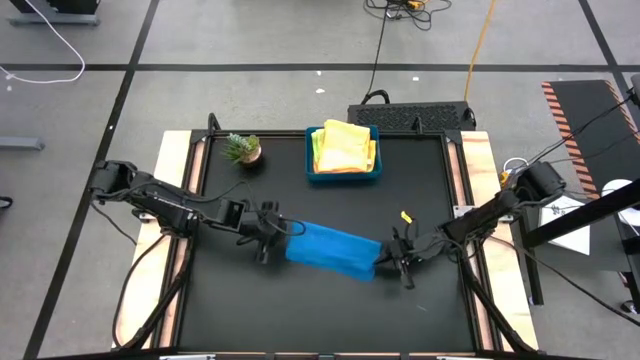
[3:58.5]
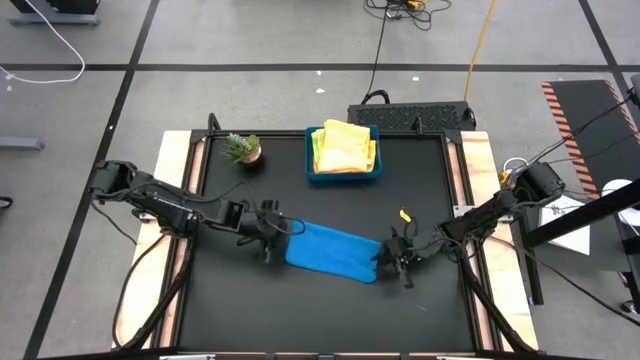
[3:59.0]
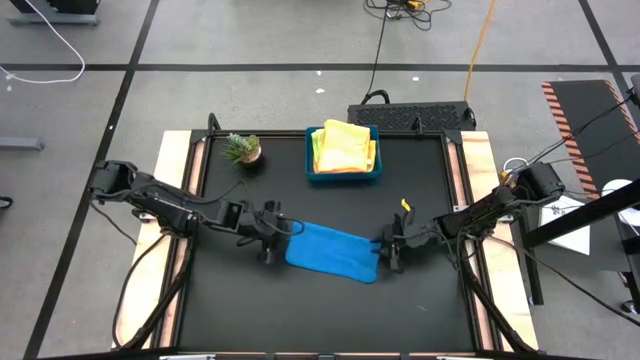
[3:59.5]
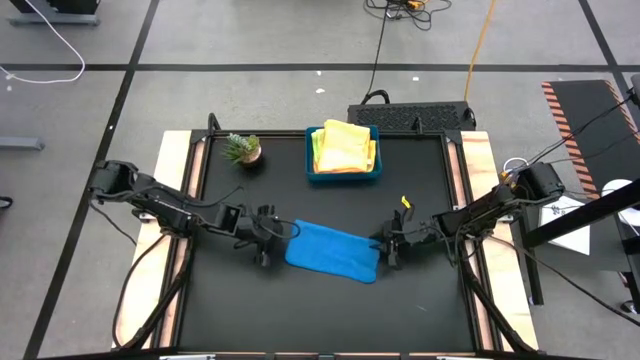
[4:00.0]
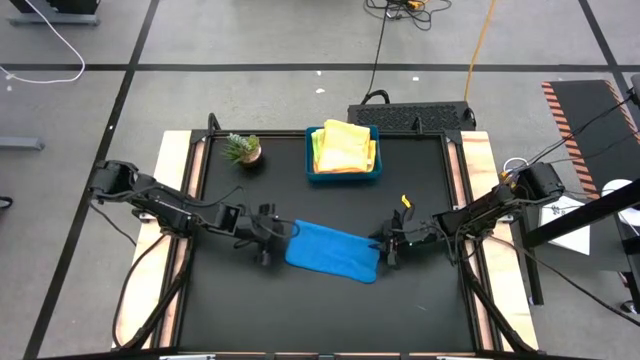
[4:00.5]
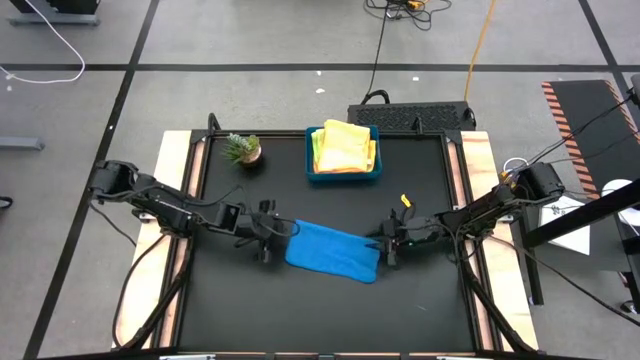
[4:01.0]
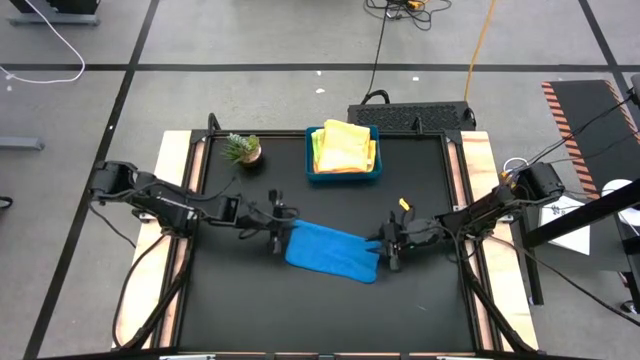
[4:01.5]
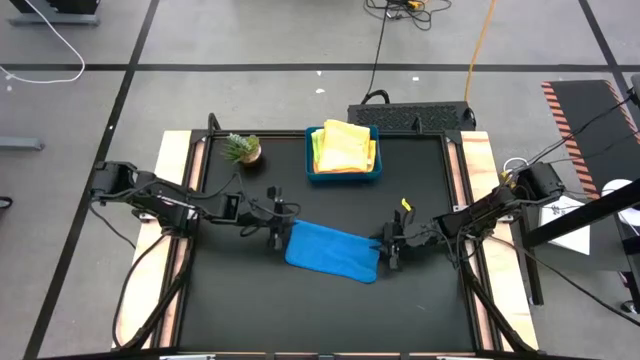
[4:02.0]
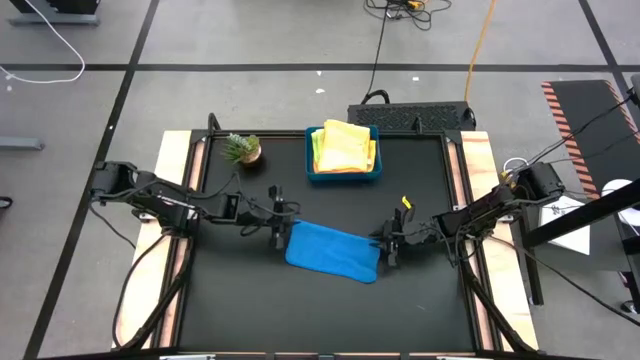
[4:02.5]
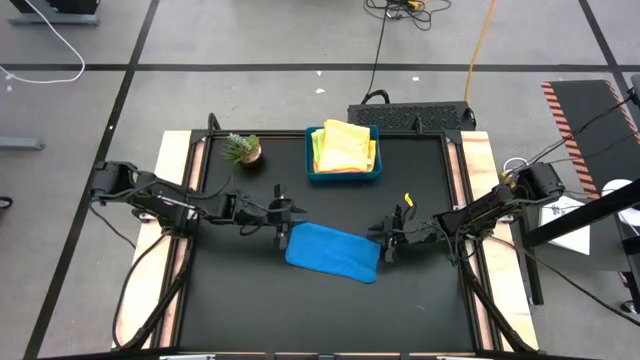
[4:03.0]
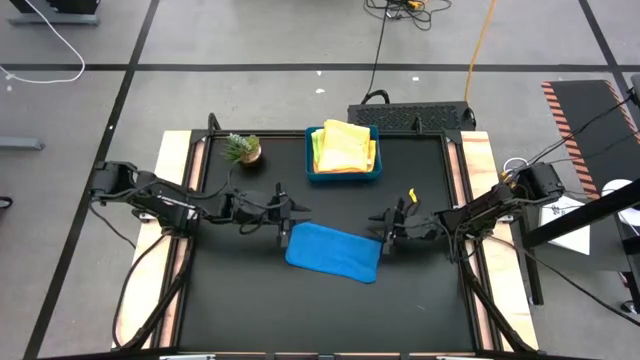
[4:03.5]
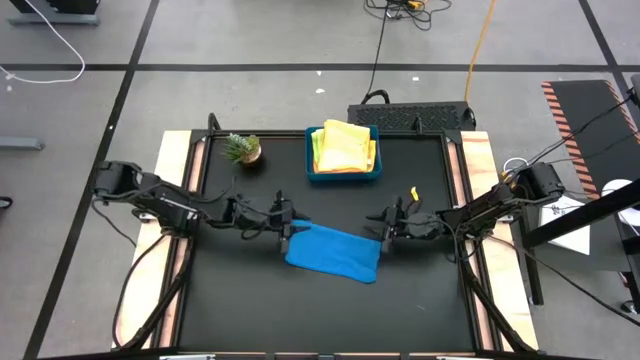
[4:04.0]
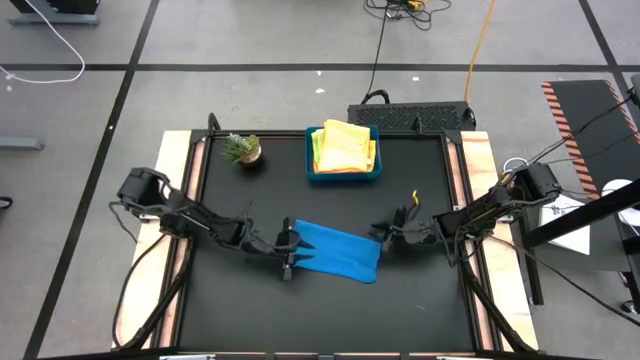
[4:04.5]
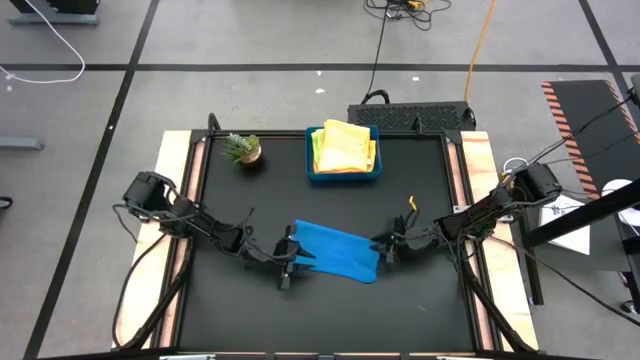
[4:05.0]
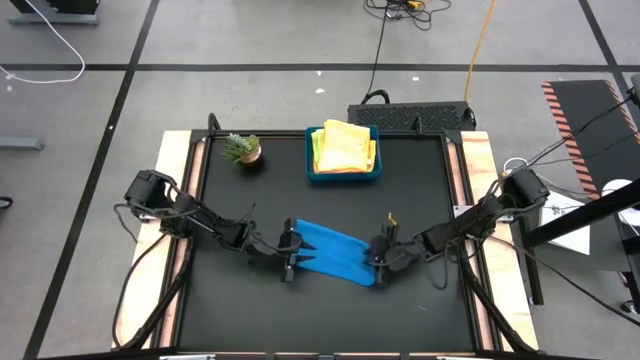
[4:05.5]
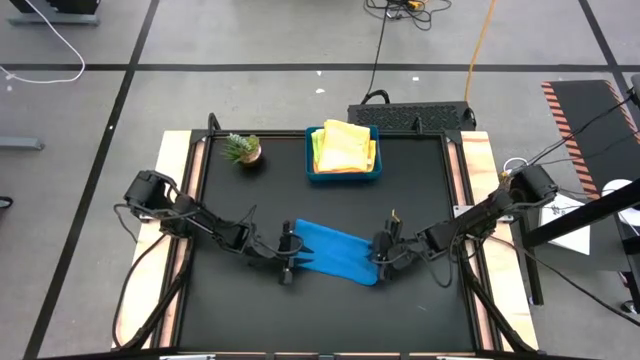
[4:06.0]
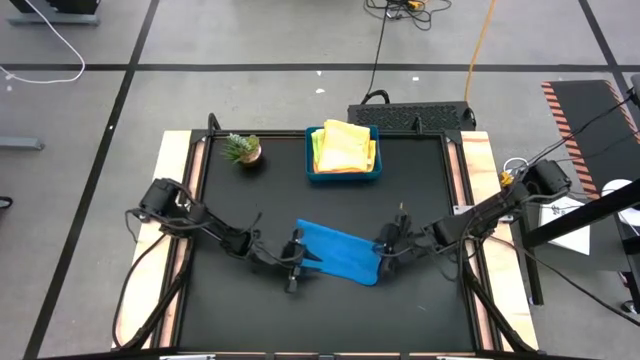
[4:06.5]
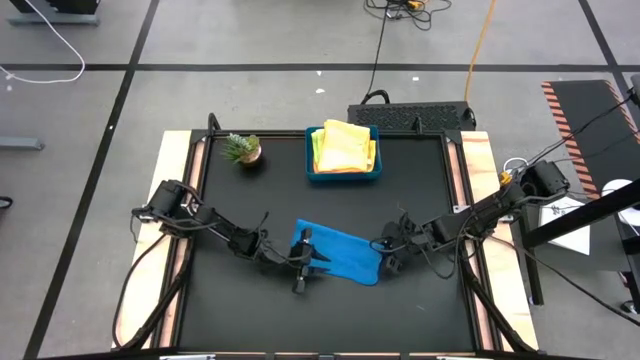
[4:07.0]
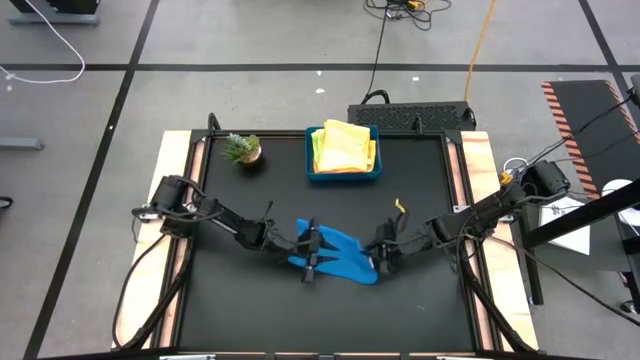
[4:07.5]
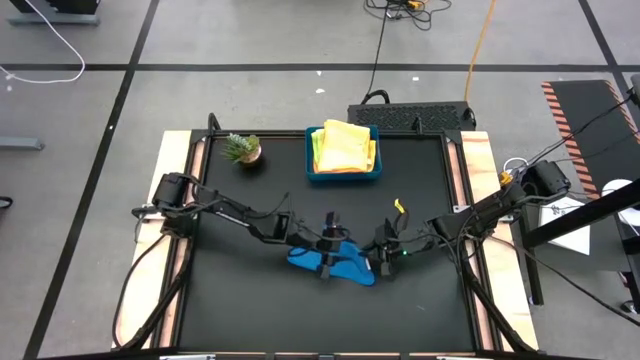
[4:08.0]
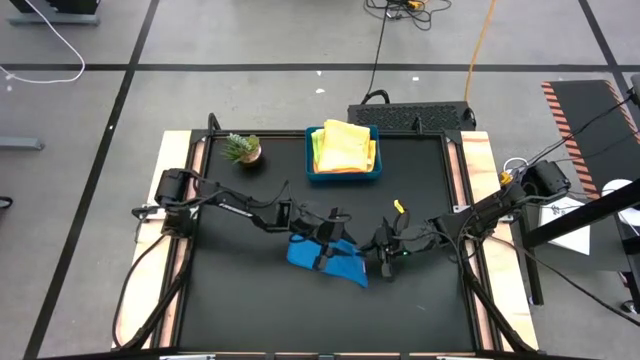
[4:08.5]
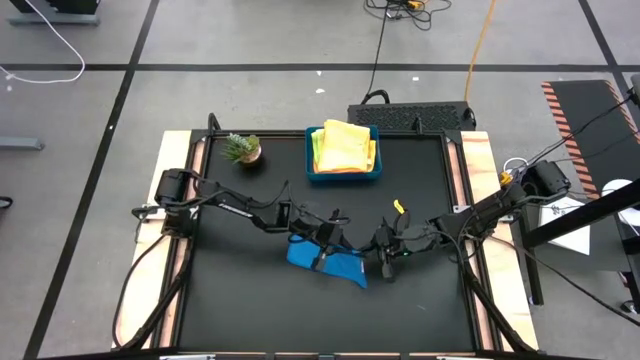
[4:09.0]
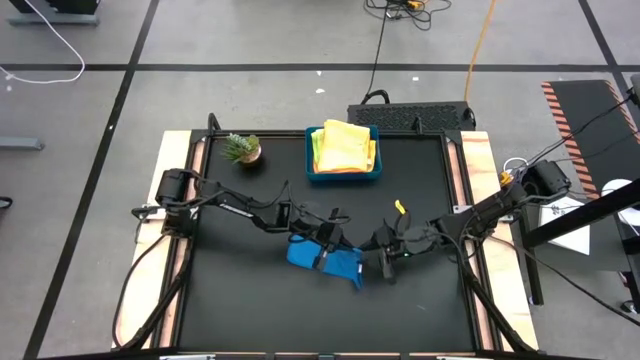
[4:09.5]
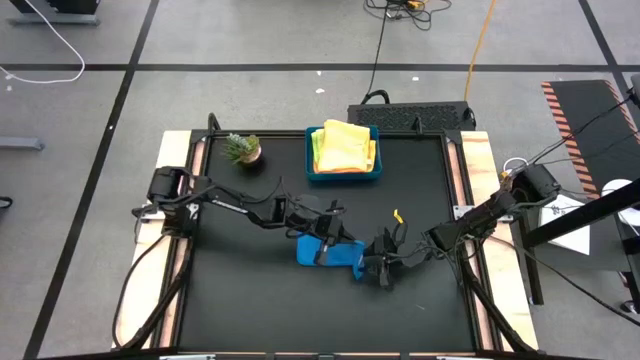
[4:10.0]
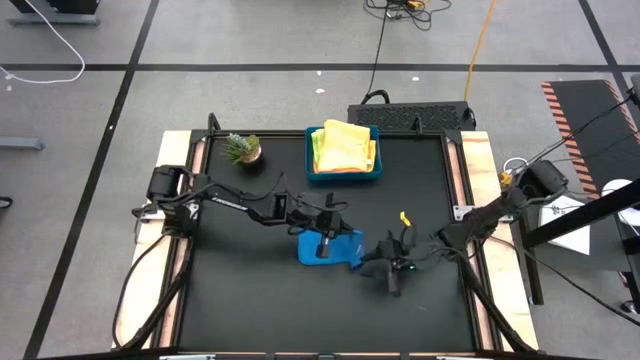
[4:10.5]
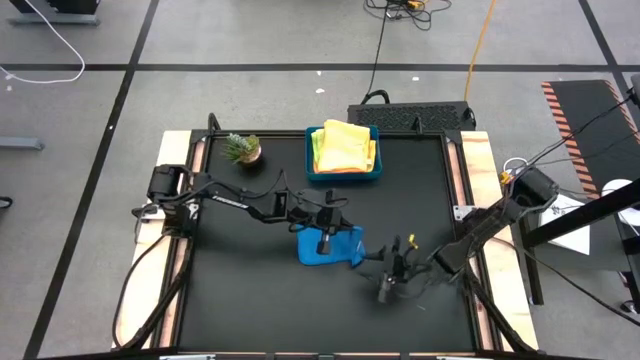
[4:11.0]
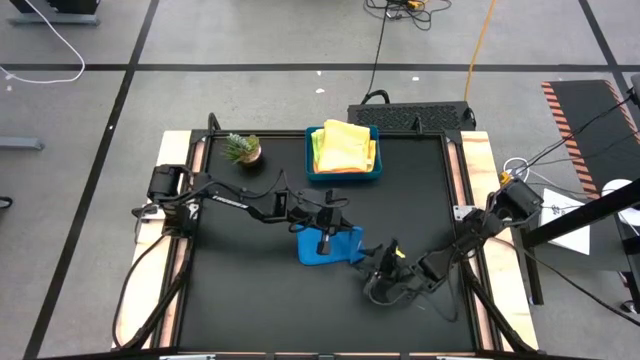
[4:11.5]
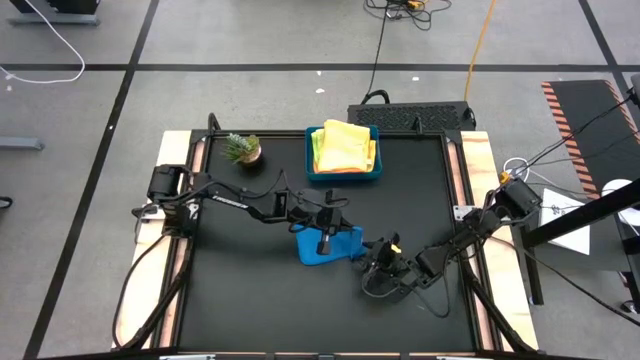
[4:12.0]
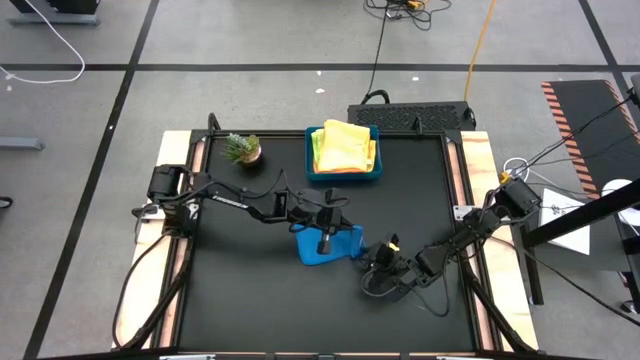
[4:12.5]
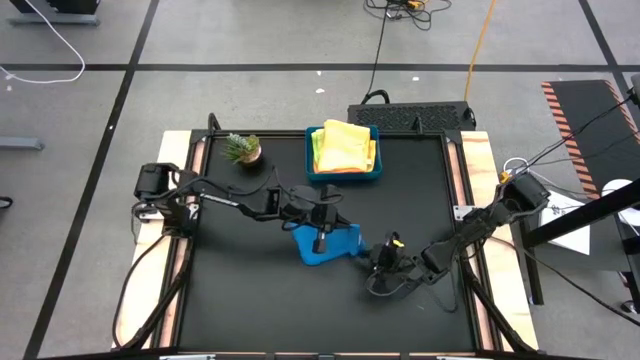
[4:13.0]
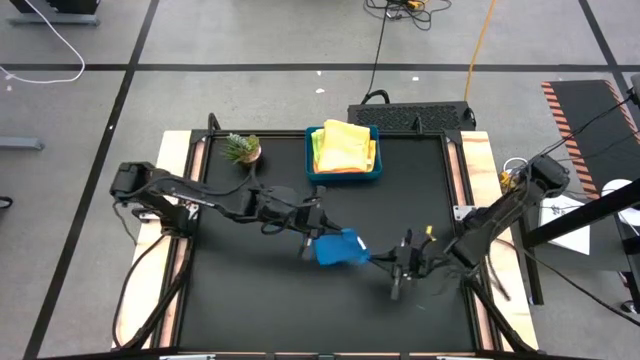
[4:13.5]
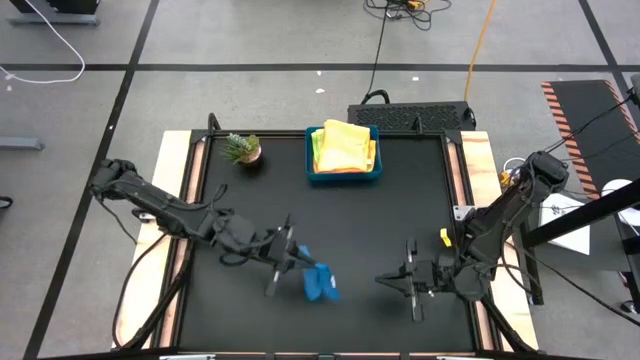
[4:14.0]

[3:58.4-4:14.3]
Task: Fold microfiber towels
Fold the blue microfiber cloth

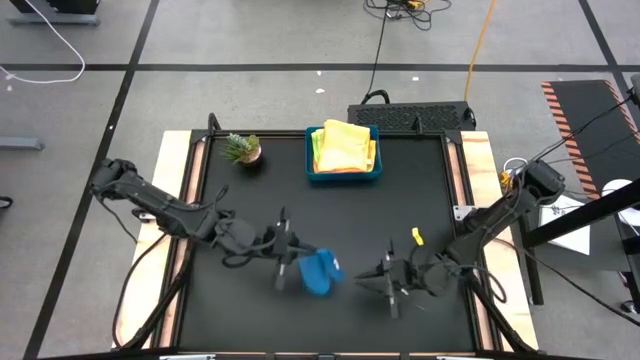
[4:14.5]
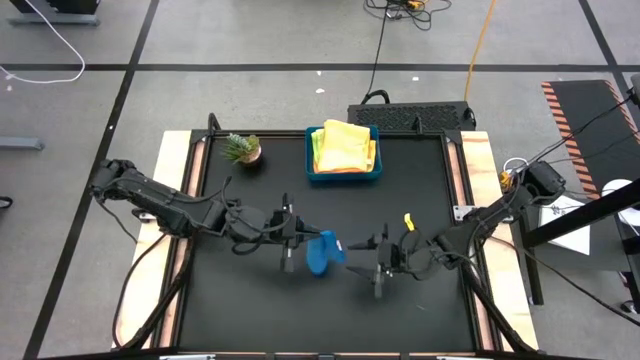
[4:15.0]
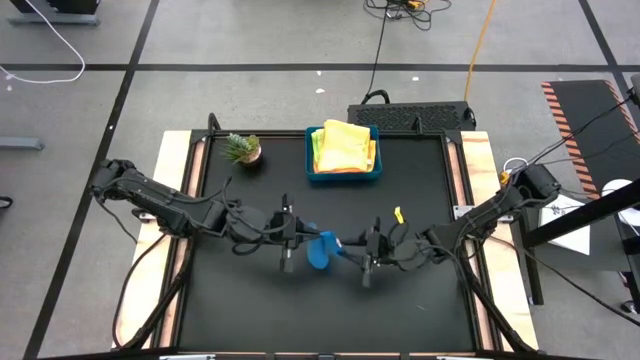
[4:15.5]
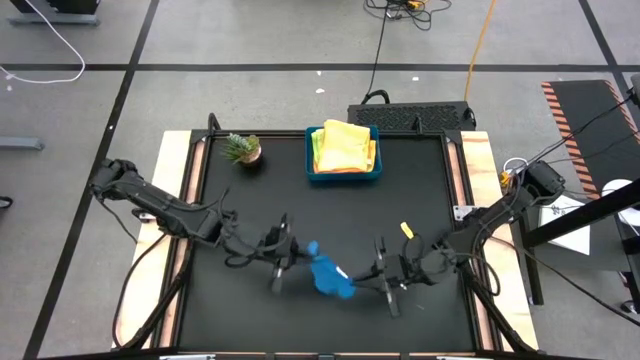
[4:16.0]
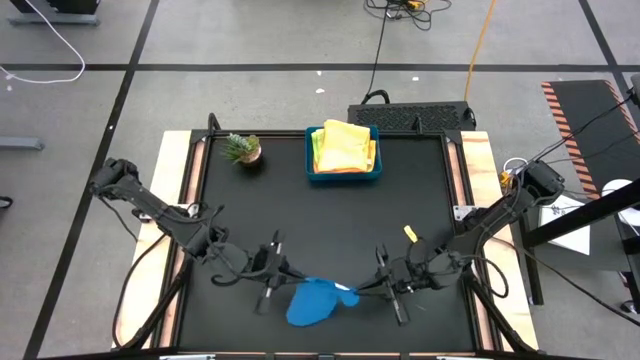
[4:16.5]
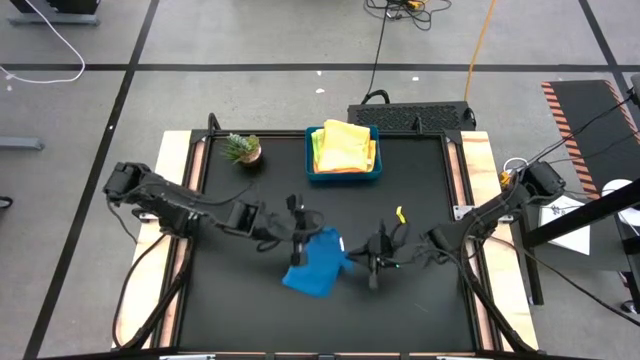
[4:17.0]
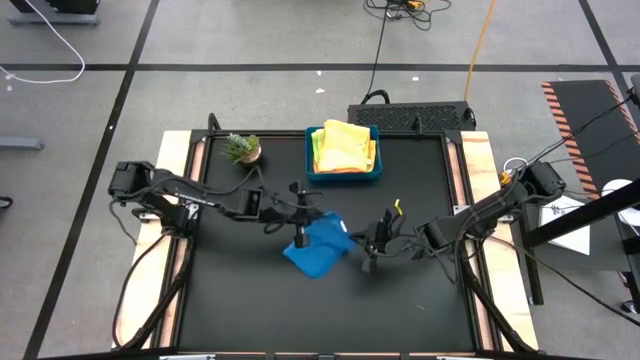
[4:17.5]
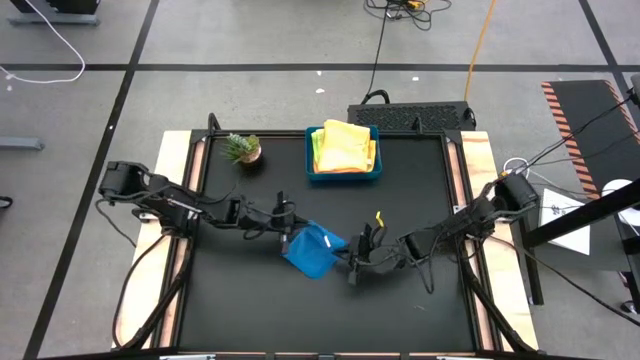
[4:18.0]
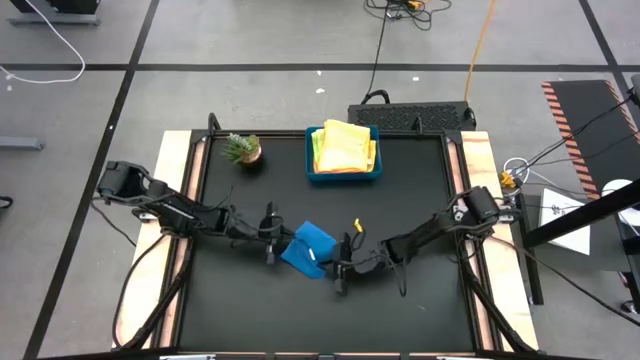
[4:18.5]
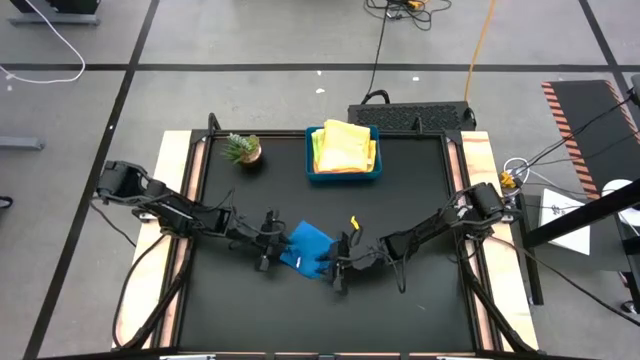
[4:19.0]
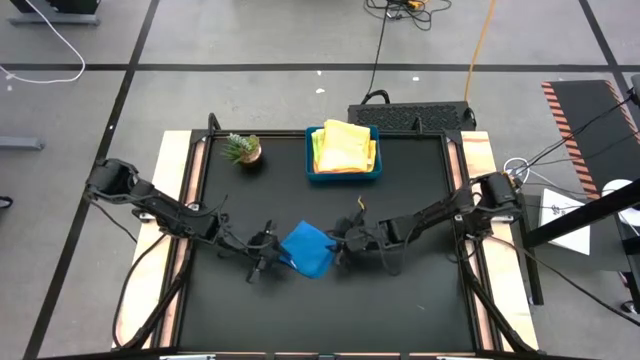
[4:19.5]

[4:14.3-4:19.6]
Fold the blue microfiber cloth

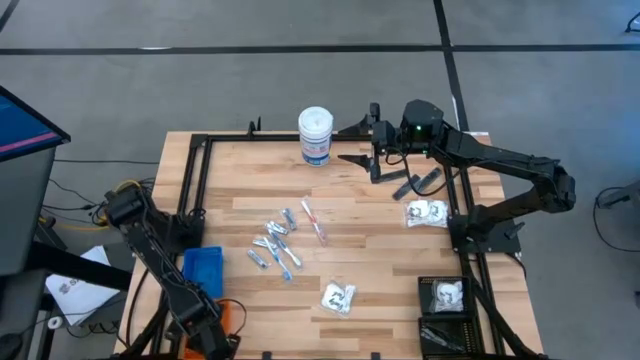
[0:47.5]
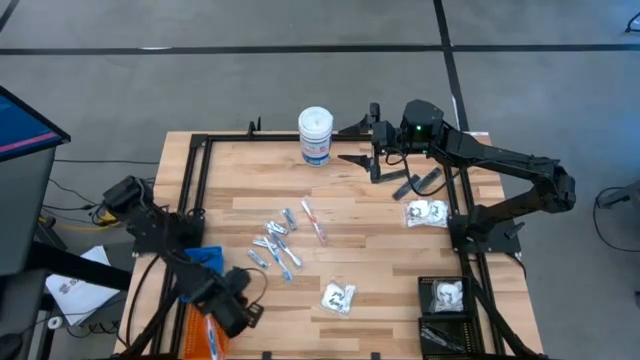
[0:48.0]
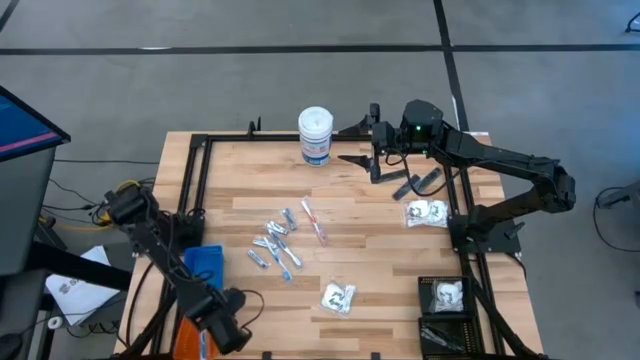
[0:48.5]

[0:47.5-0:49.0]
Task: Pick & Place Travel size toiletries
Adjust the orange bin
